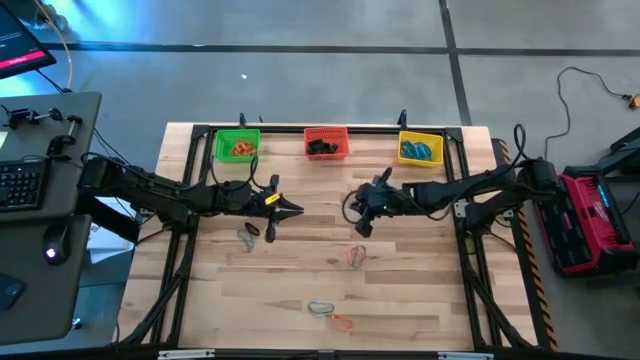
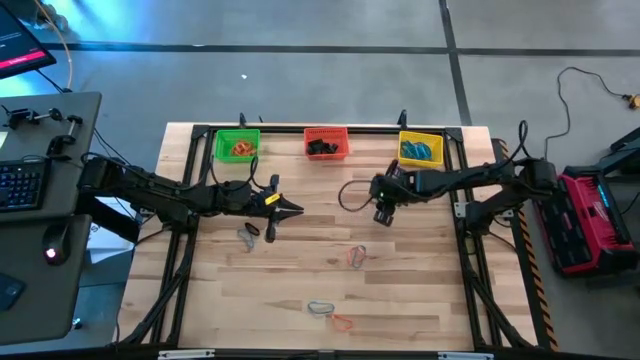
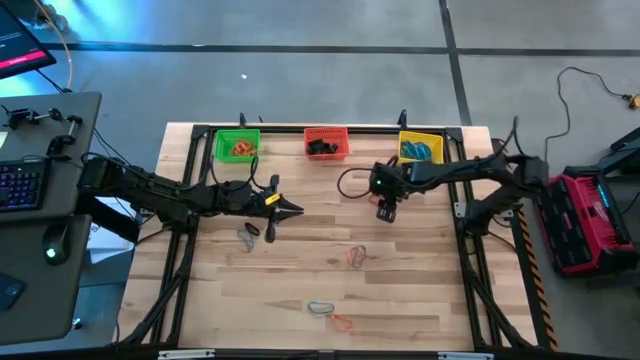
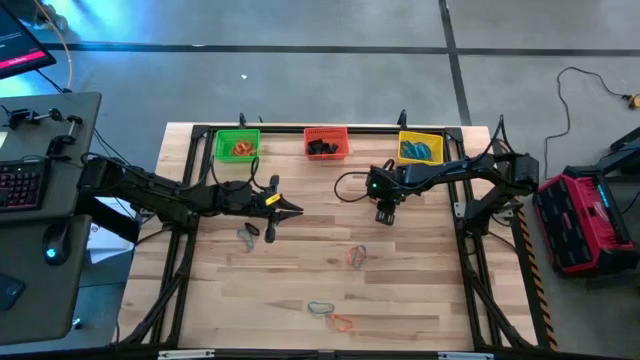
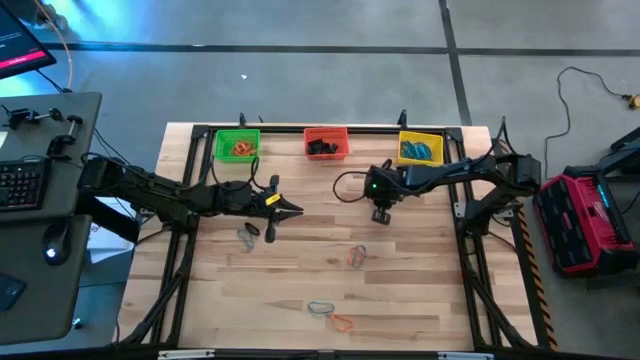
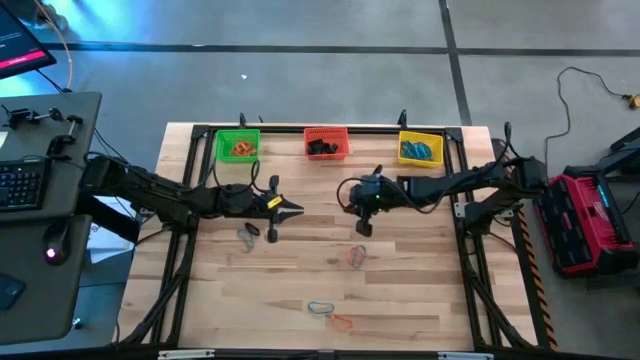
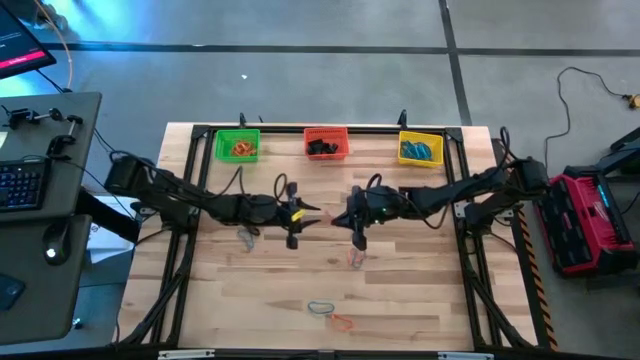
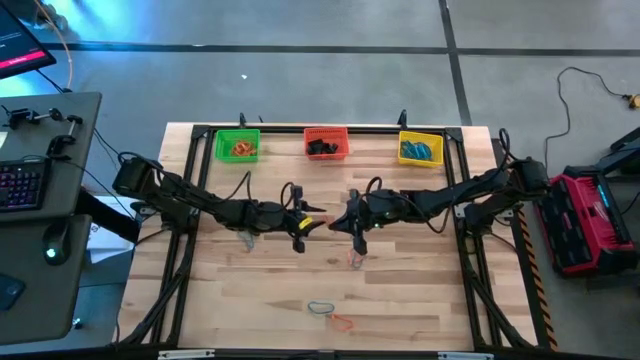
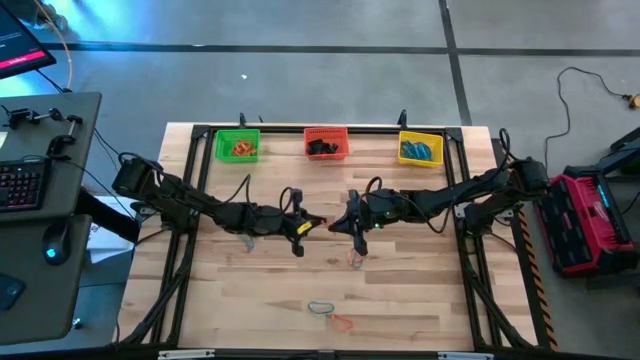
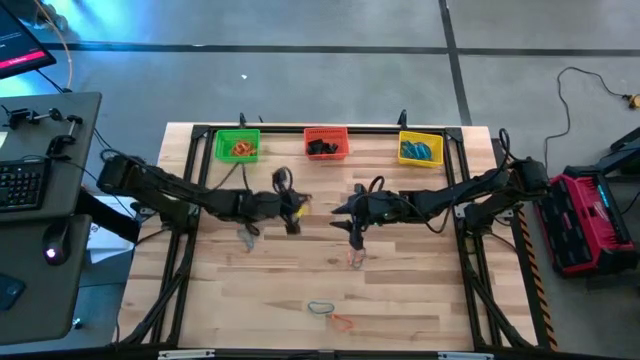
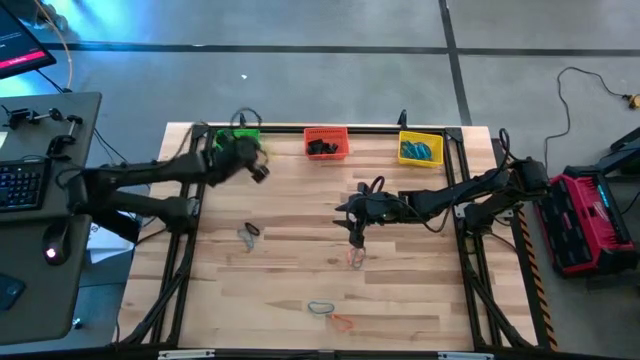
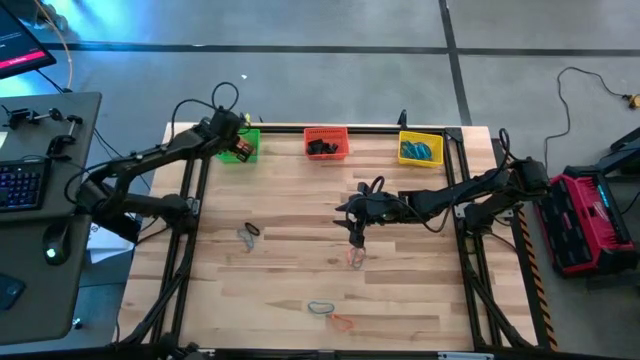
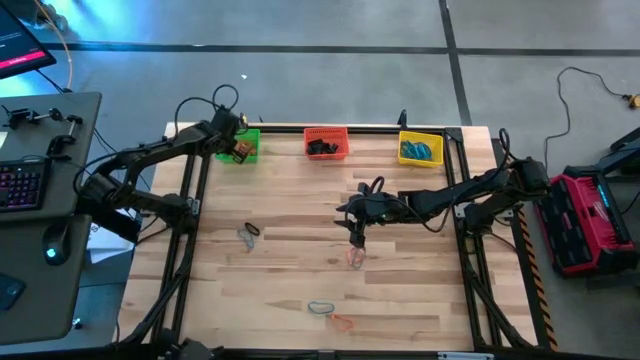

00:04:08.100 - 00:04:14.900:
Task: Sort rubber bands into baskets
Put the orange rubber band into the green bin

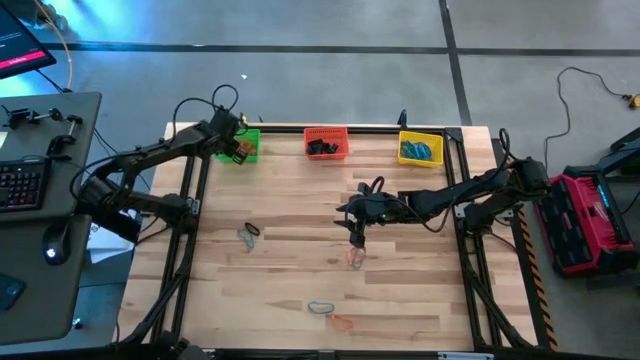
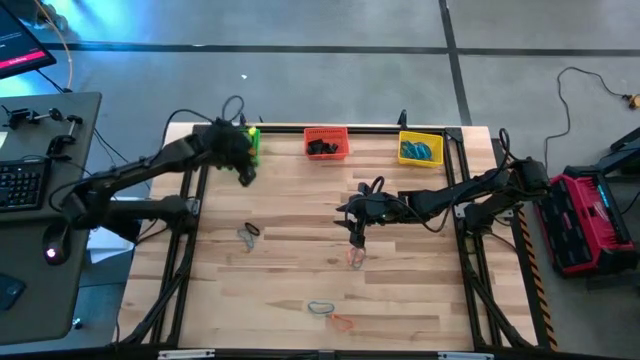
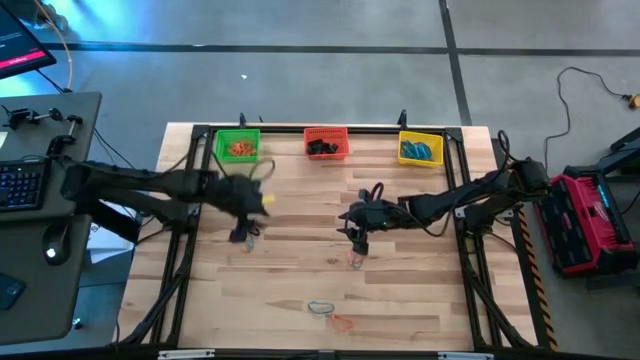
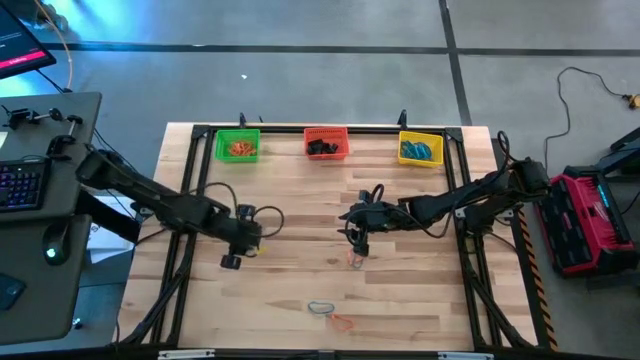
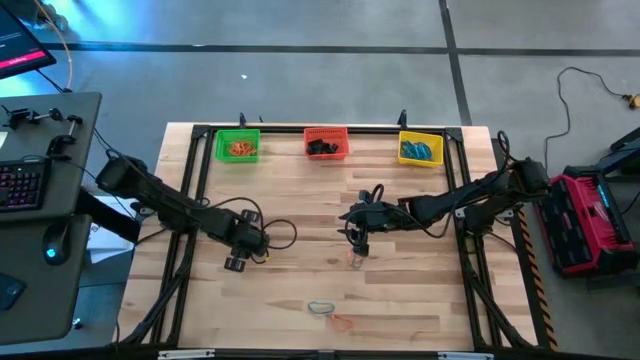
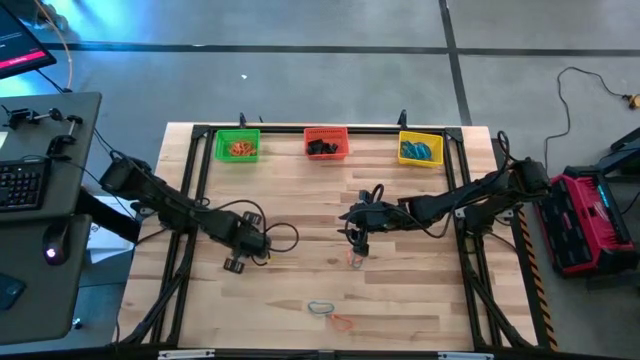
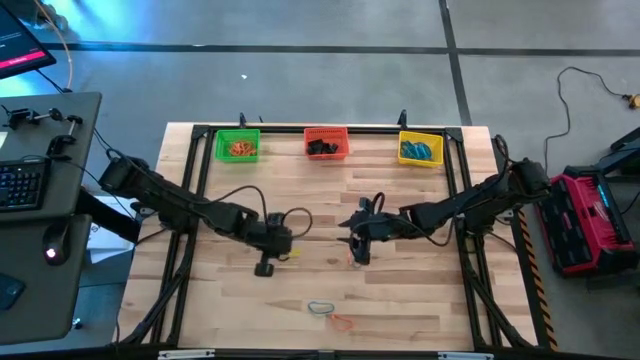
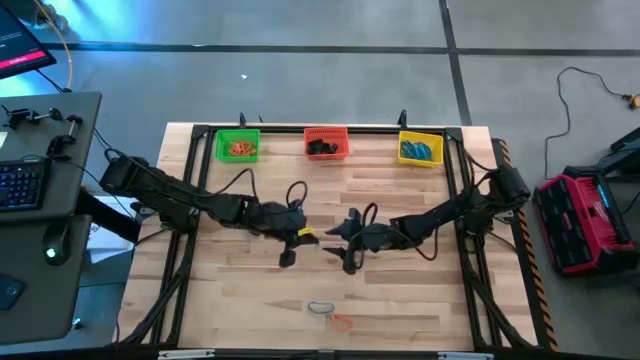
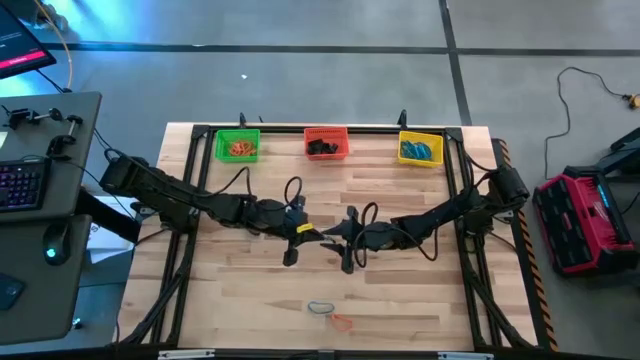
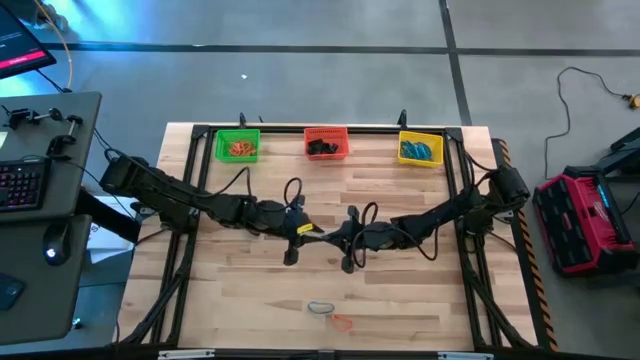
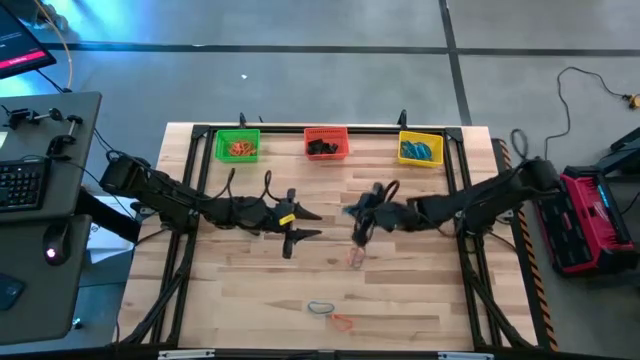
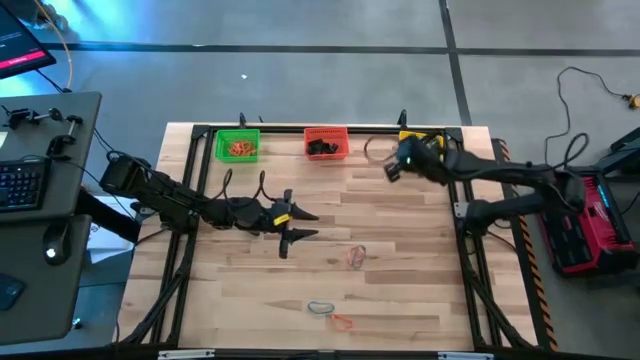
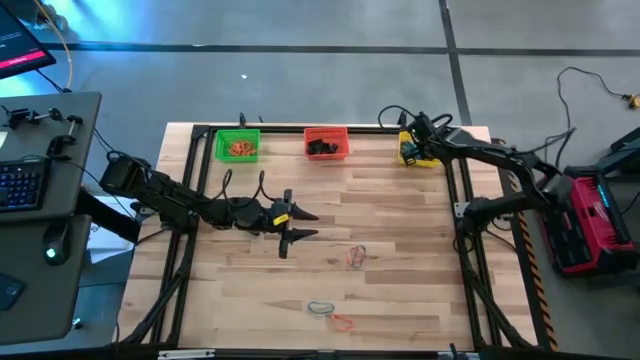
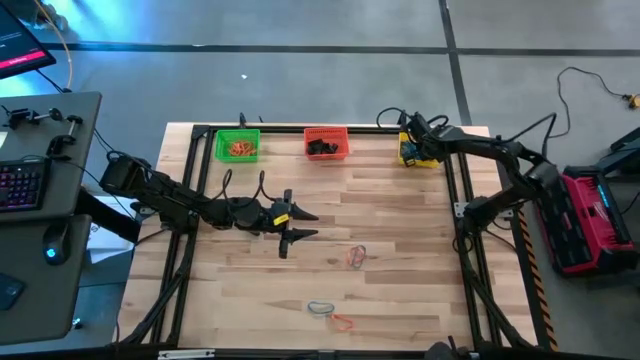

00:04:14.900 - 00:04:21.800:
Put the blue rubber band into the yellow bin

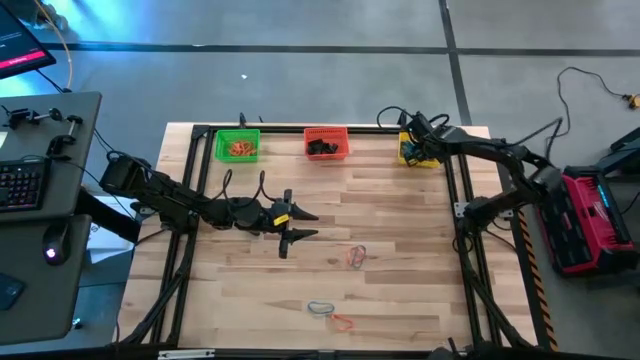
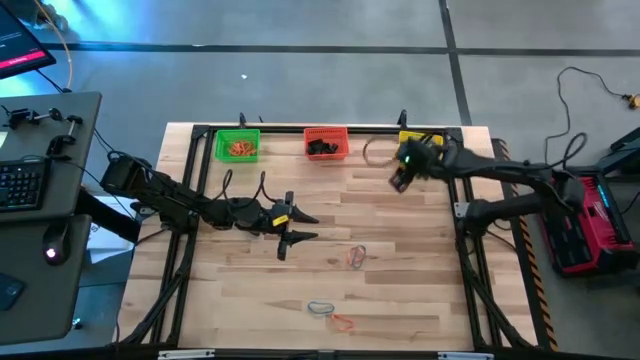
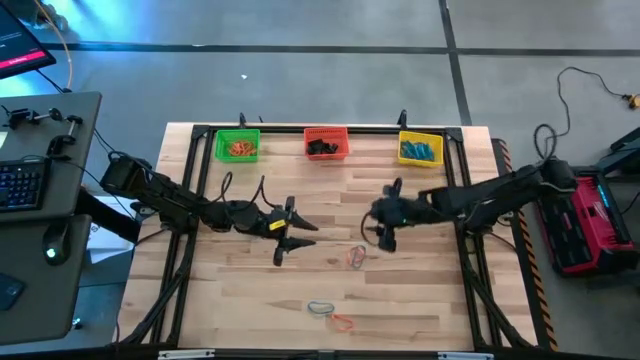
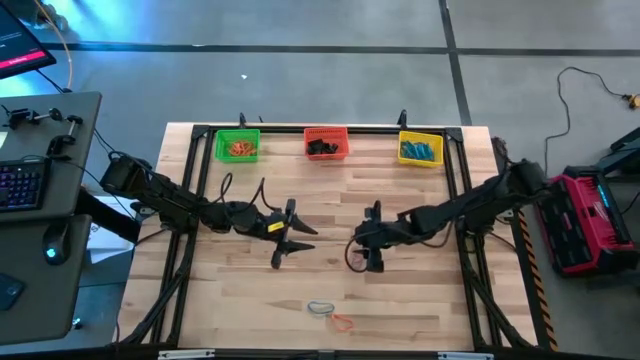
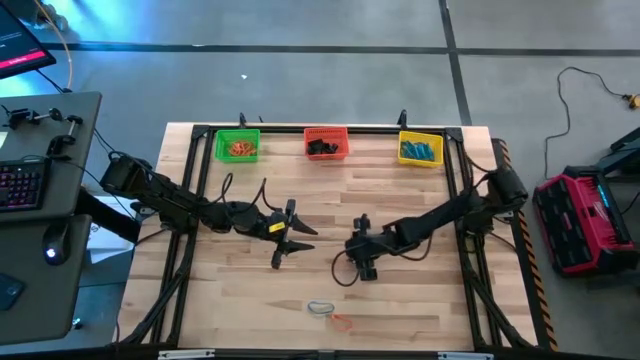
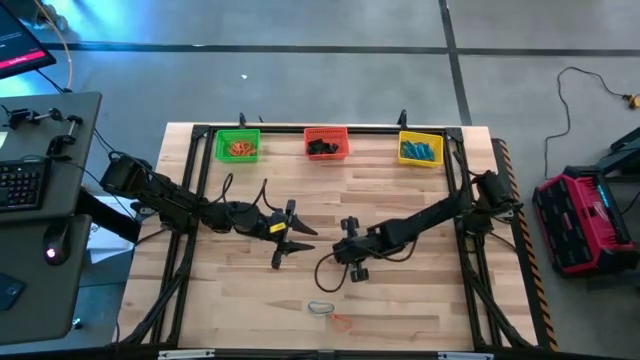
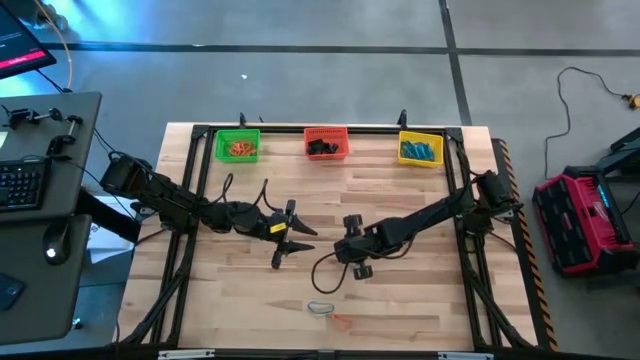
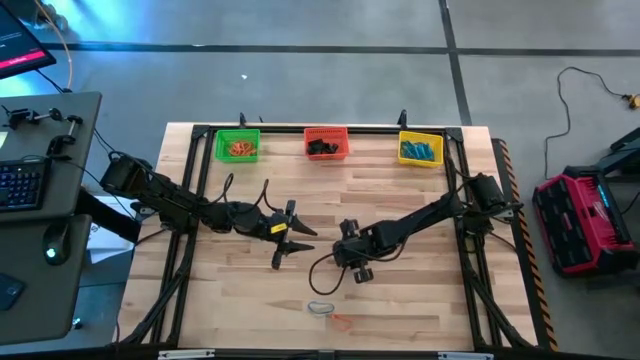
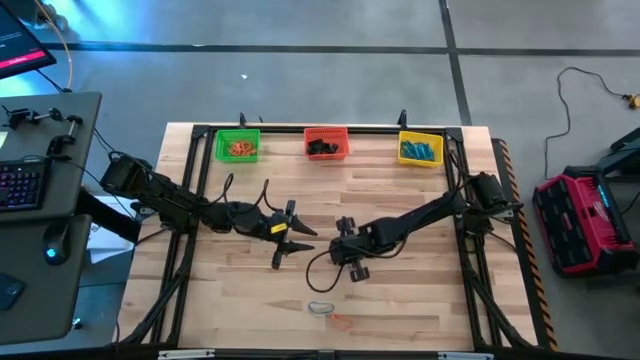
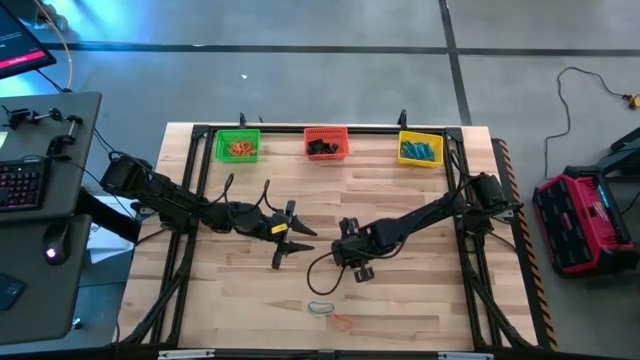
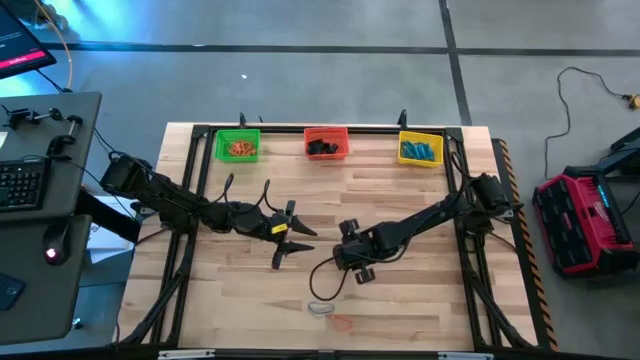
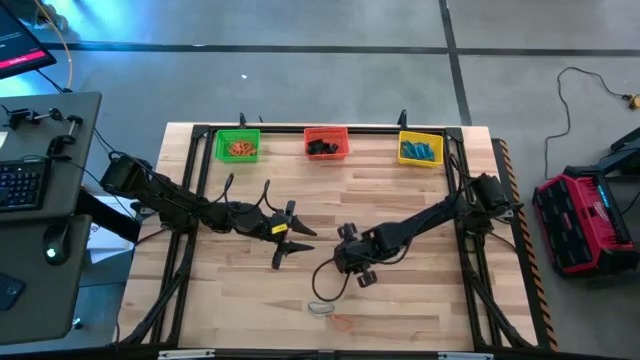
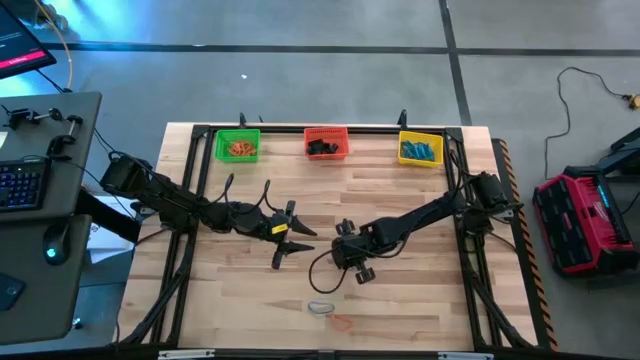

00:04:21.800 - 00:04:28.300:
Put the orange rubber band into the green bin

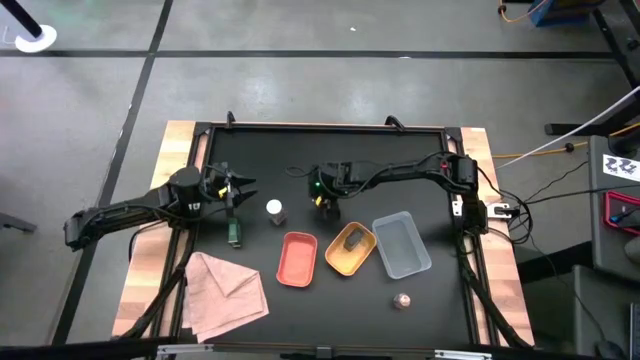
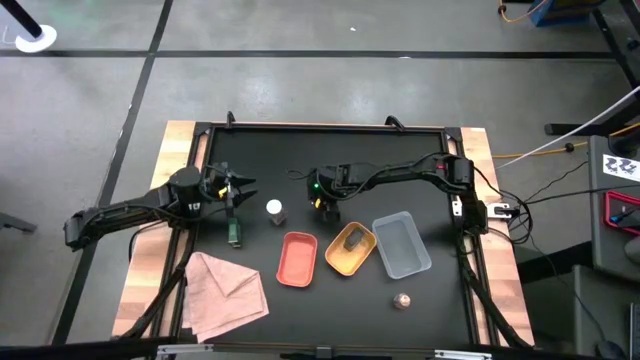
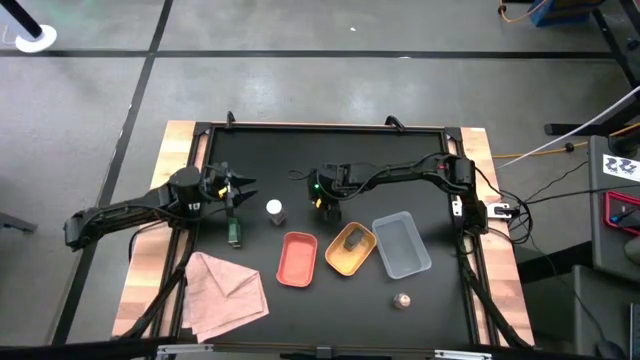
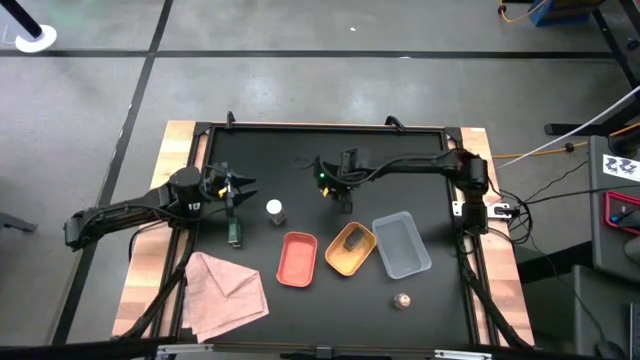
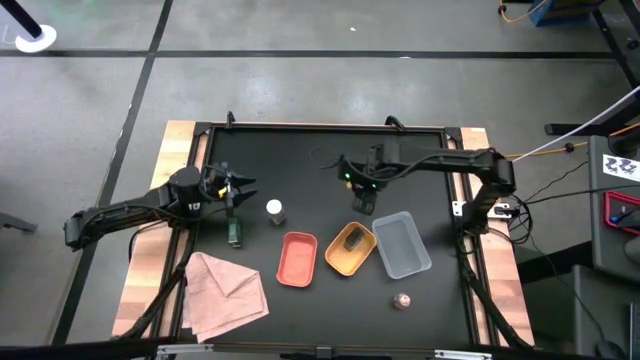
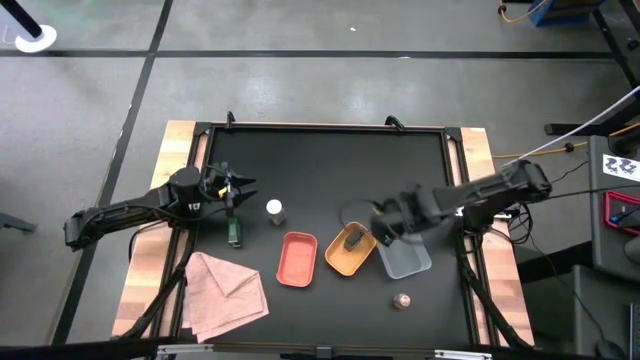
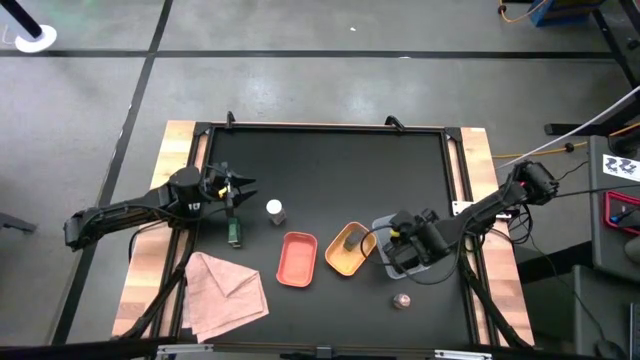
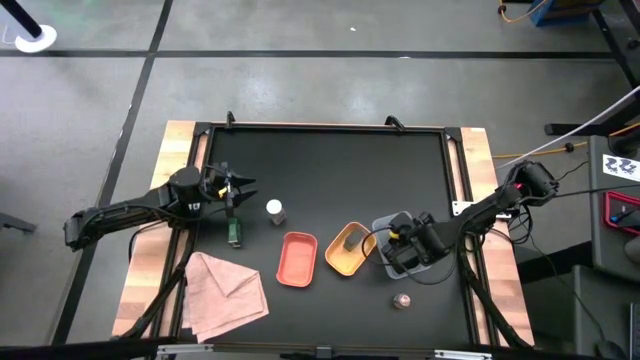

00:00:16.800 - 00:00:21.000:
Task: Sort spices by type
Put the top brown spice bottle into the transparent bin
